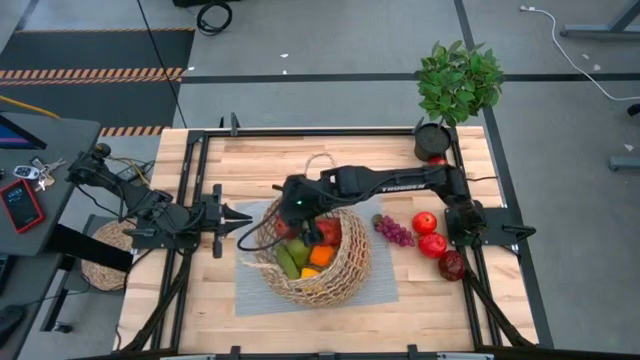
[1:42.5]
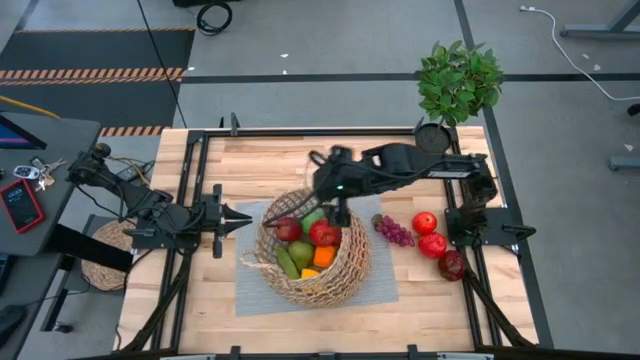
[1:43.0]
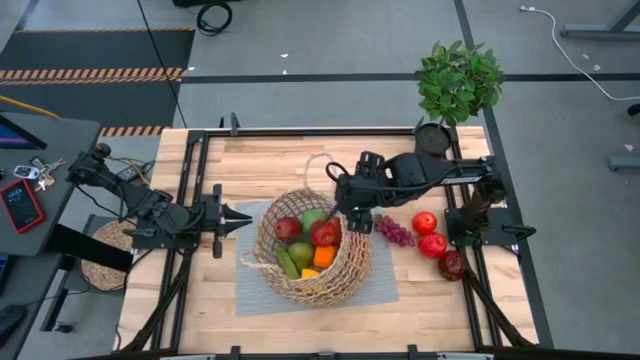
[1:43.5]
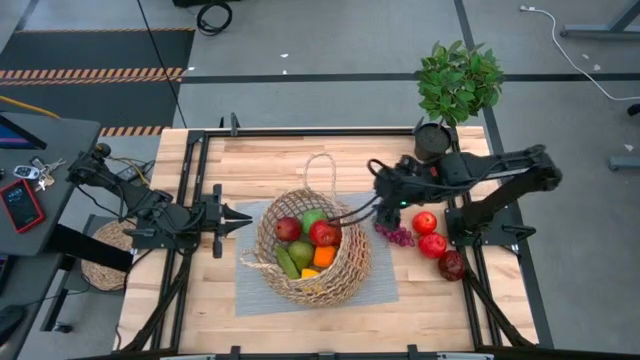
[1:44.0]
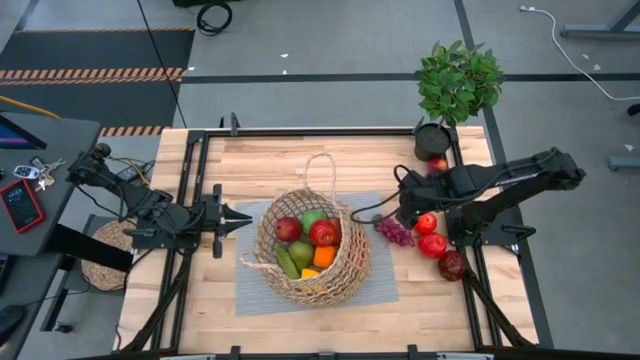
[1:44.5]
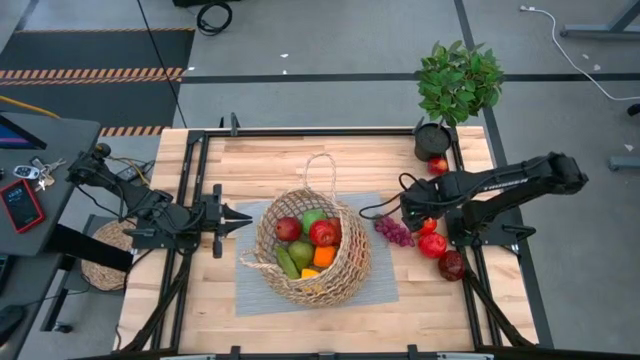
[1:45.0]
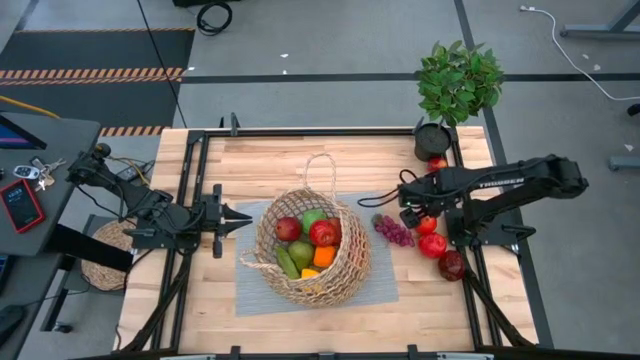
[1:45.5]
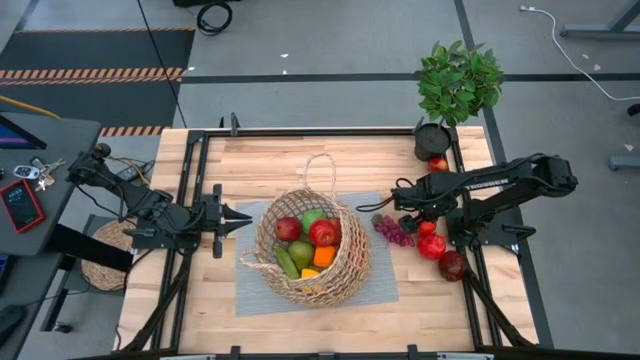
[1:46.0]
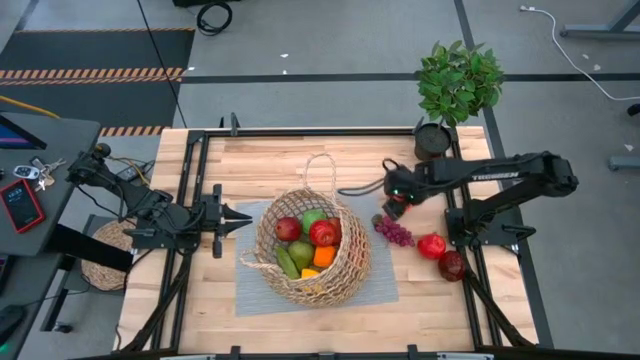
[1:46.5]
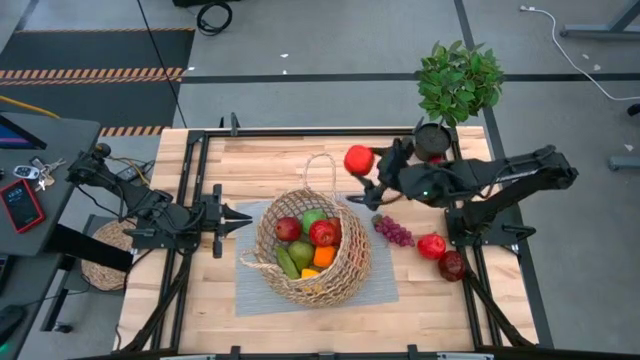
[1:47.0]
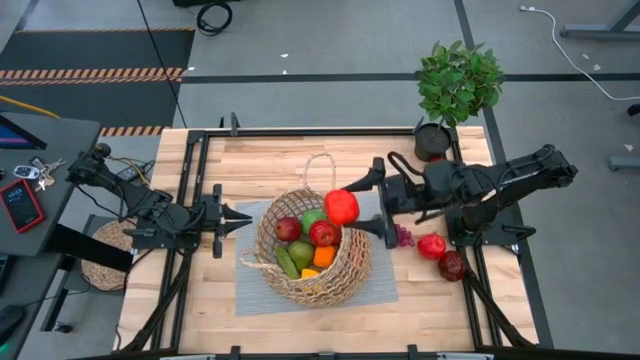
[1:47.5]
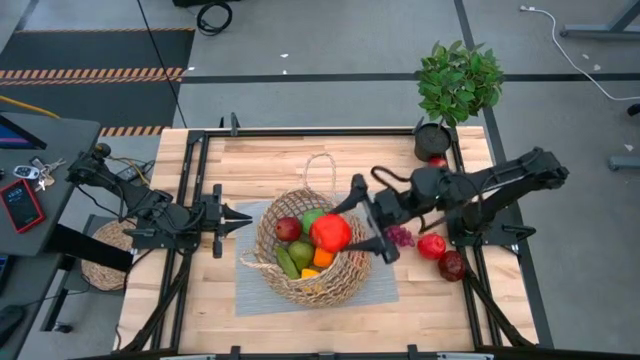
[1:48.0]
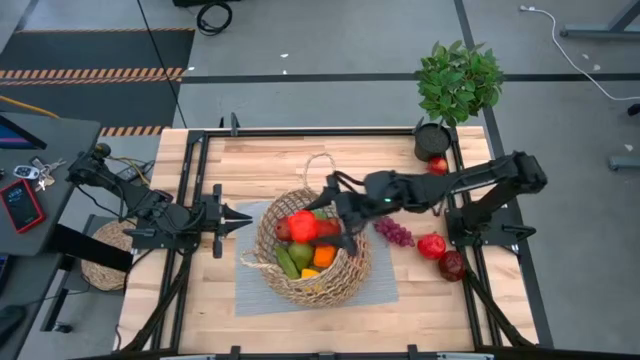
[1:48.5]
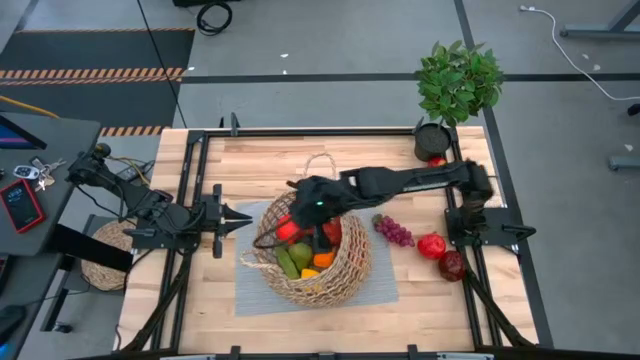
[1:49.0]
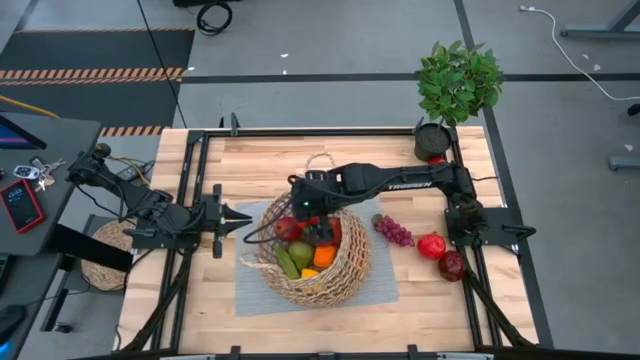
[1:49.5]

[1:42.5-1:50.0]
Task: Build produce basket
Put the red apple into the basket

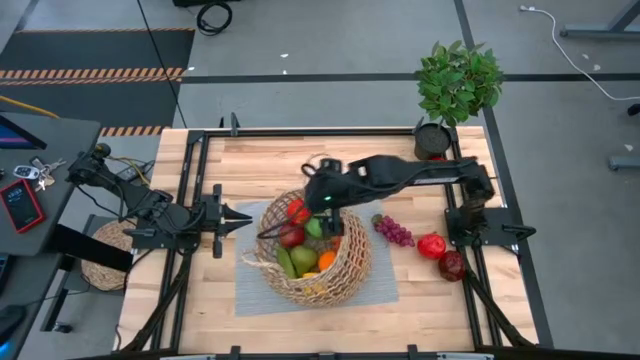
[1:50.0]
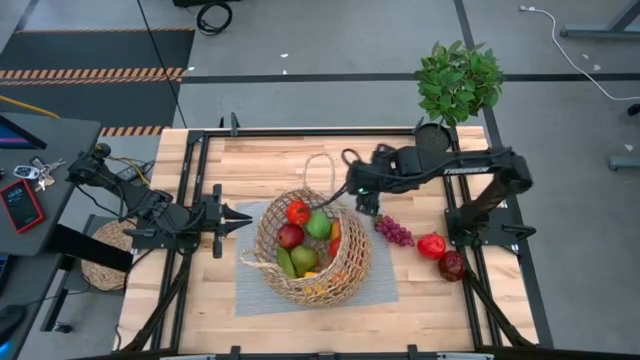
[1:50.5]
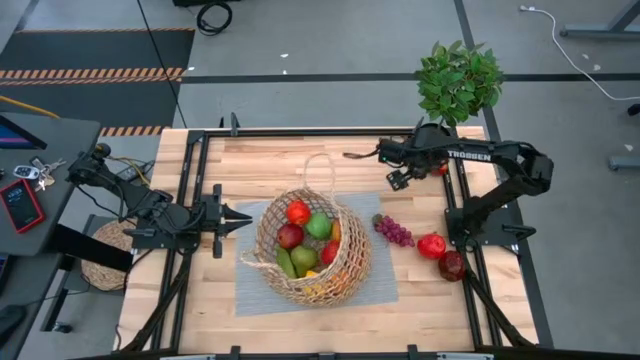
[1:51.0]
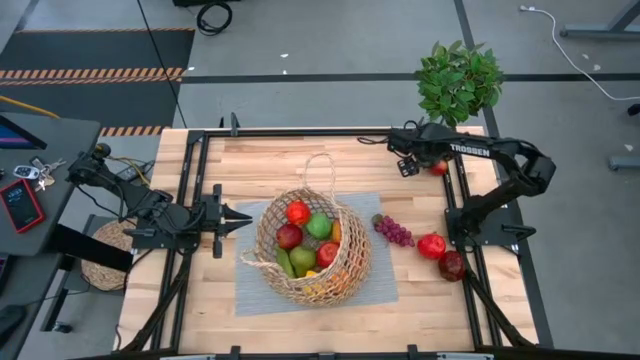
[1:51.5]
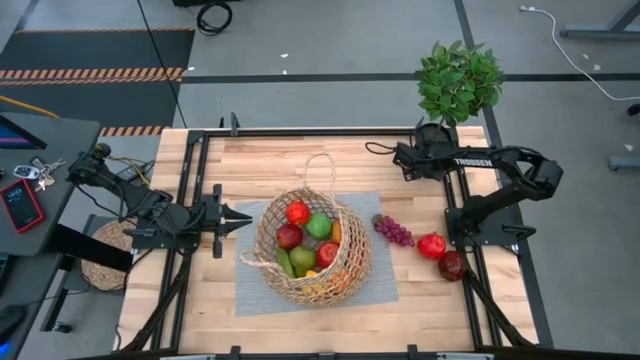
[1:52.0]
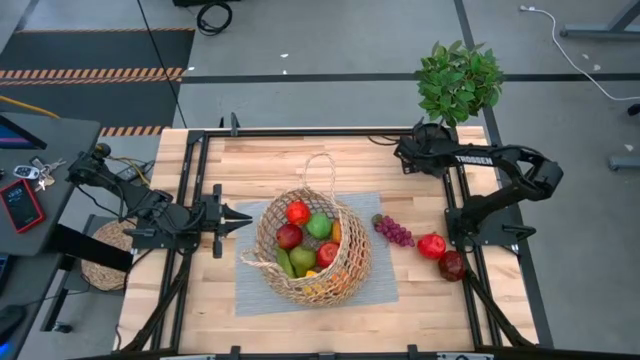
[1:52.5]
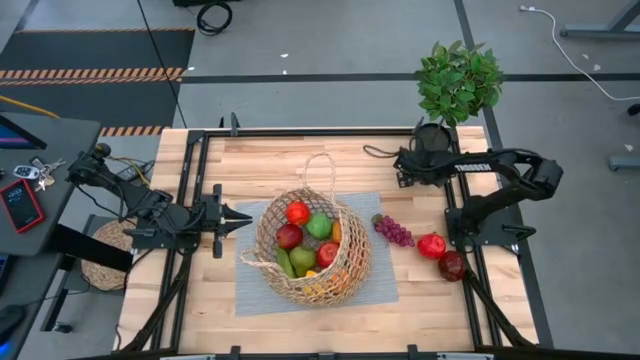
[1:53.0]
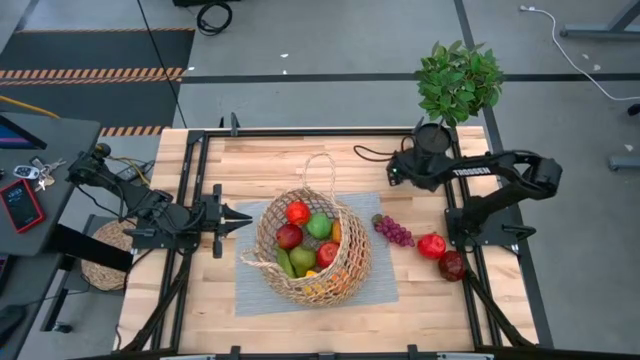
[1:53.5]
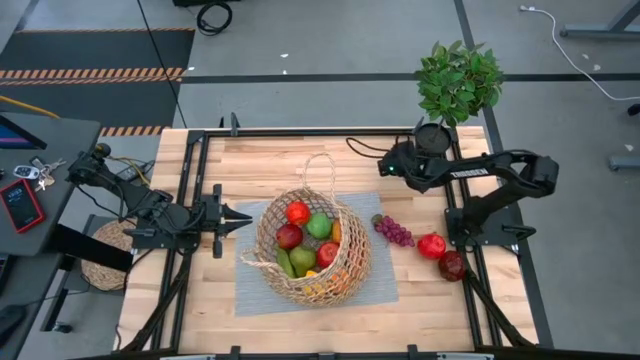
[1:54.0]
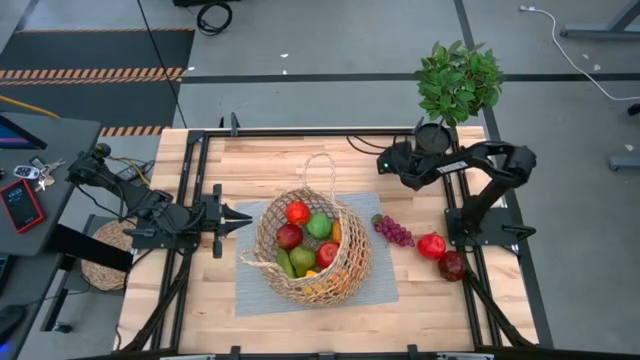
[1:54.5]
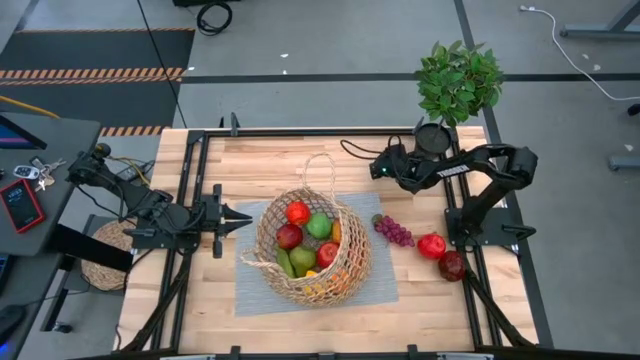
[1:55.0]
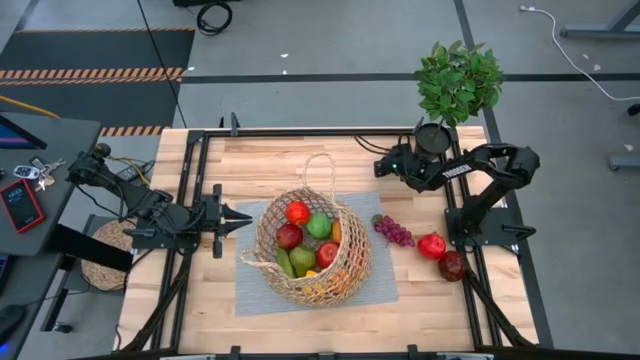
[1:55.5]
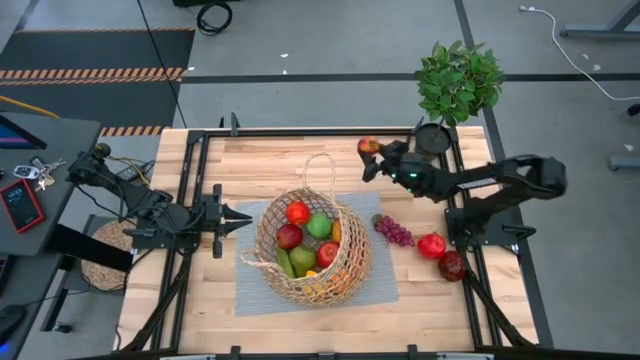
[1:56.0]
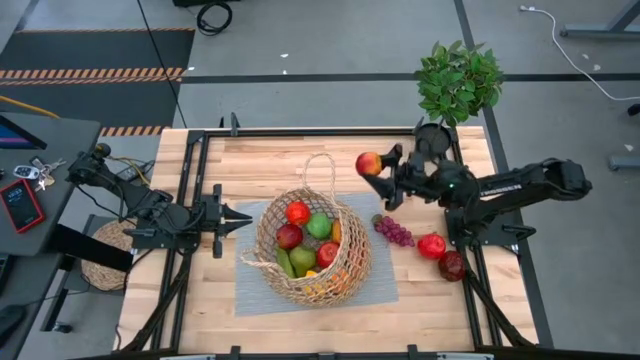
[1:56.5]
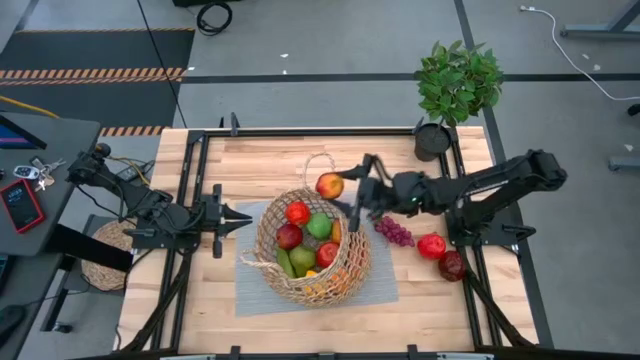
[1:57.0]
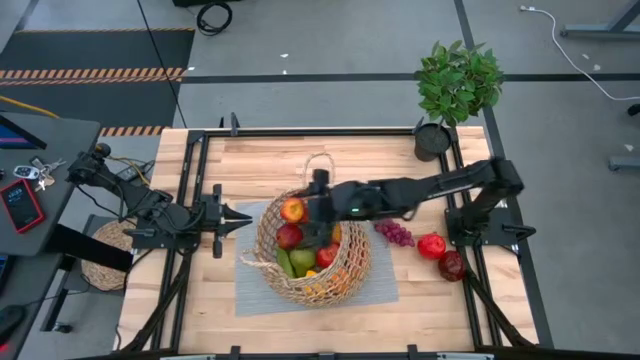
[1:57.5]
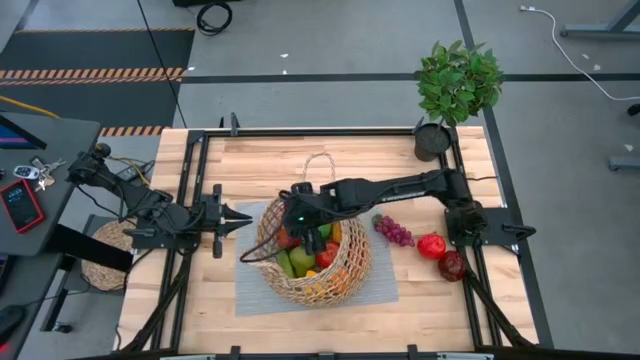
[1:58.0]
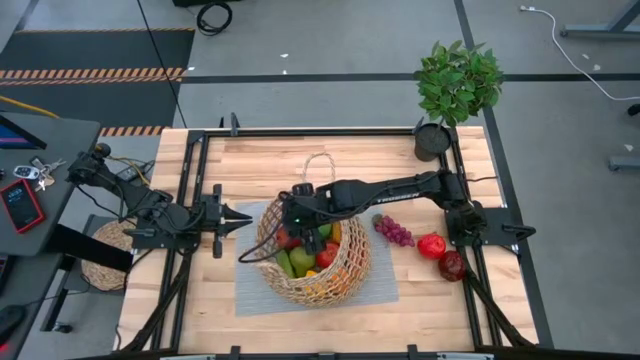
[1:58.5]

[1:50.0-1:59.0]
Put the red apple into the basket

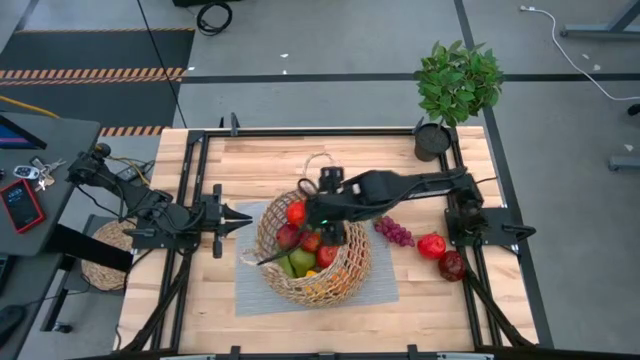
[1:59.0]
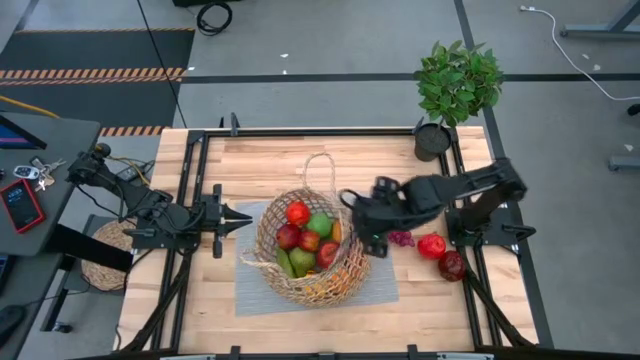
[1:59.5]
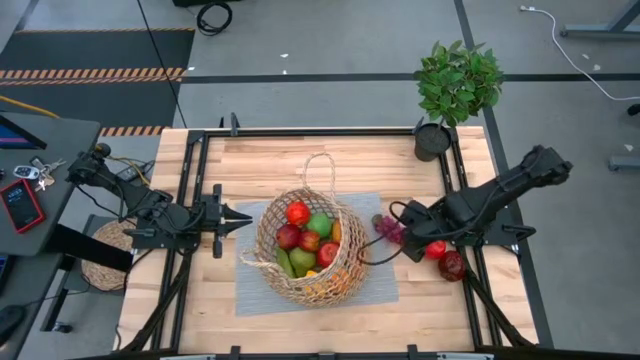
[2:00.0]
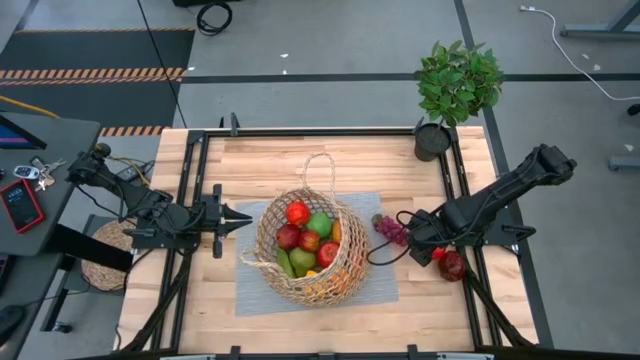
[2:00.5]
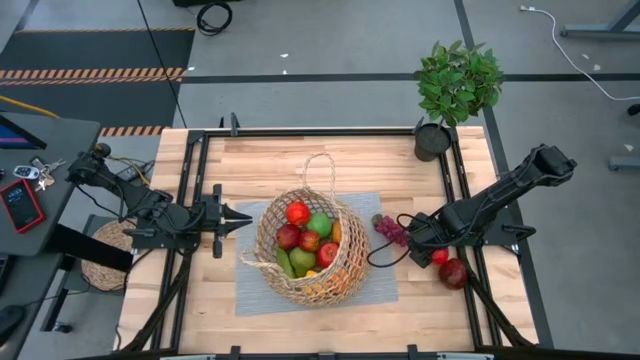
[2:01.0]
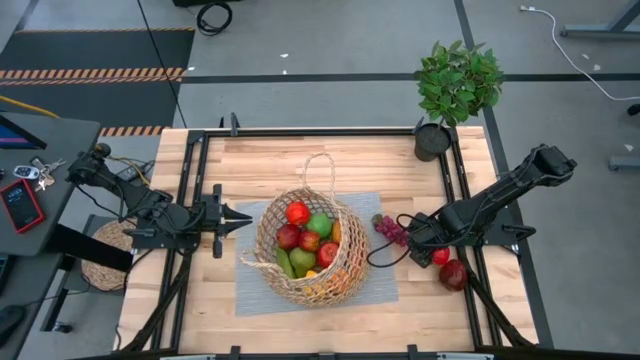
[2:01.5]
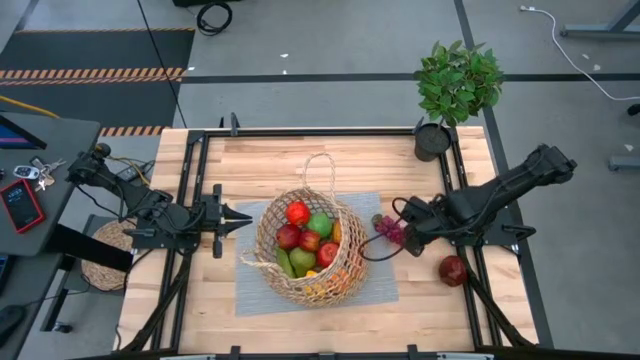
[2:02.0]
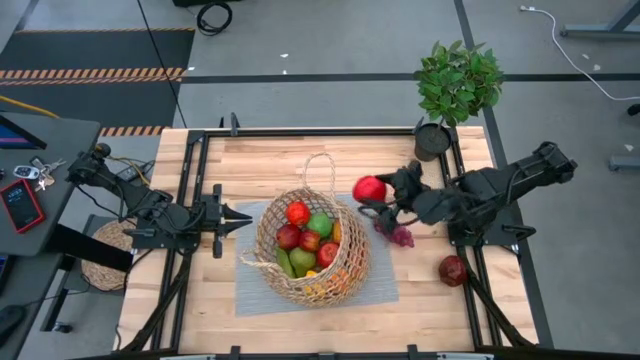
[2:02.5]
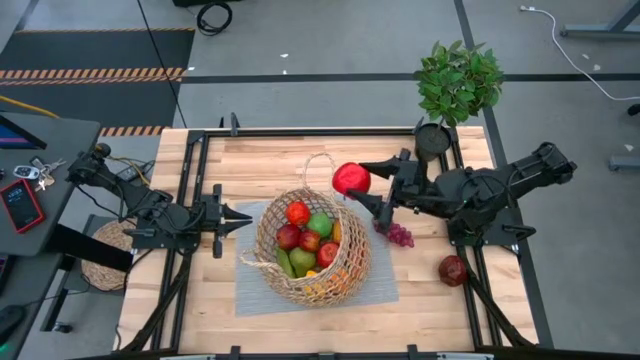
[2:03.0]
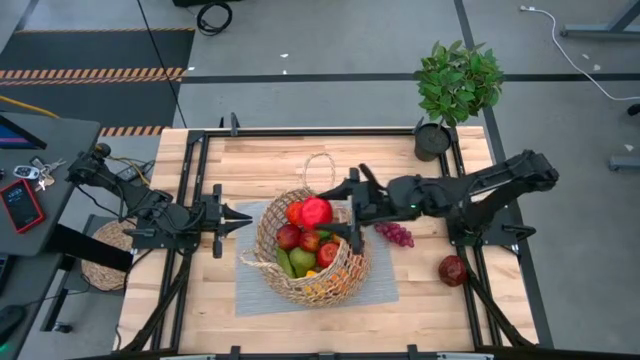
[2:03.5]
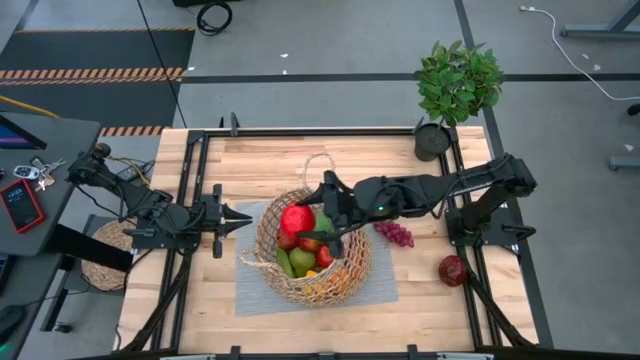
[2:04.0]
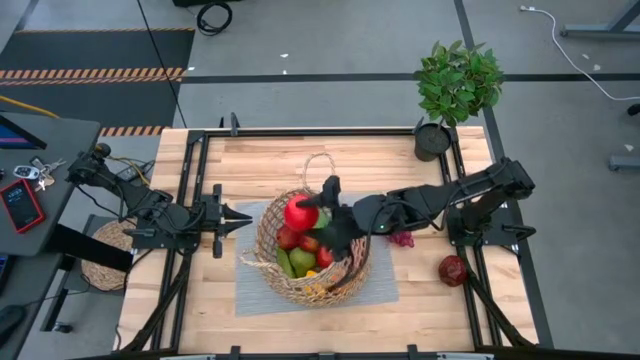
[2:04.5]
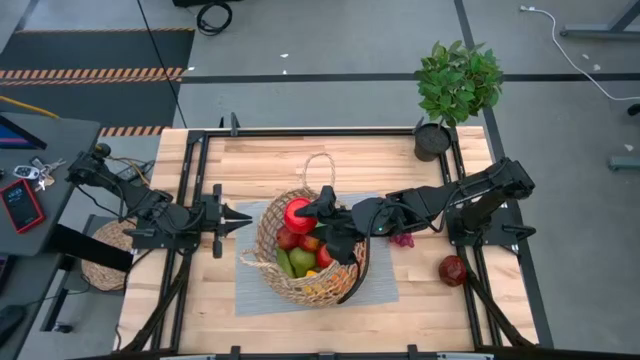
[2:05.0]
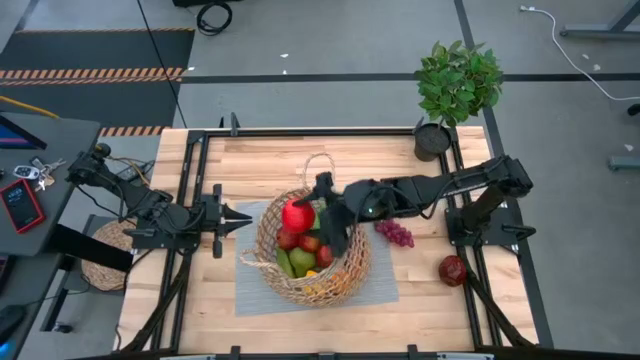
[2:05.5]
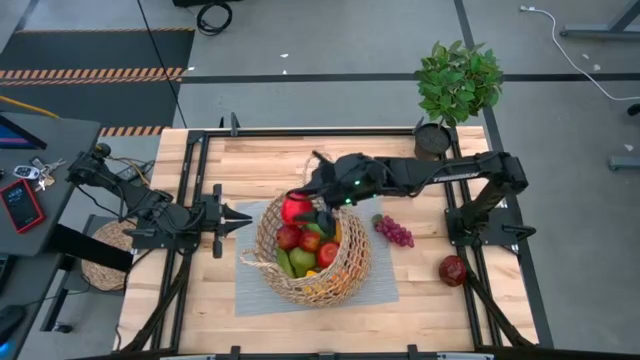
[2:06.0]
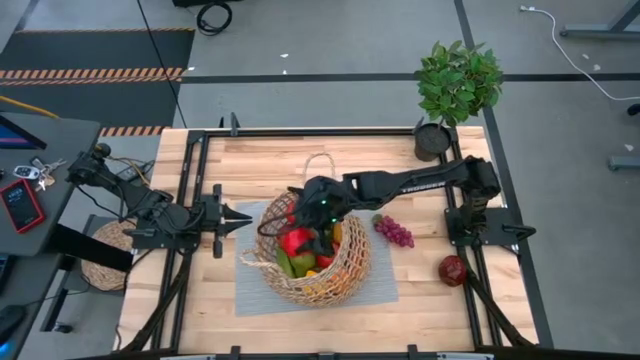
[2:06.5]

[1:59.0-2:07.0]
Put the red apple into the basket
